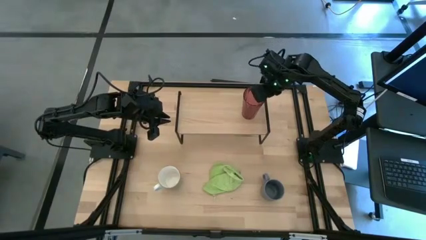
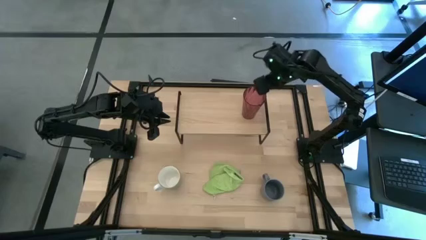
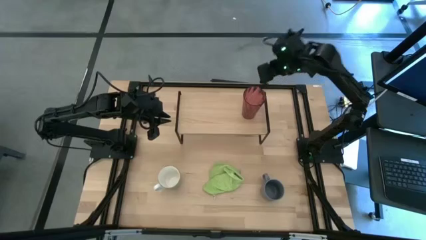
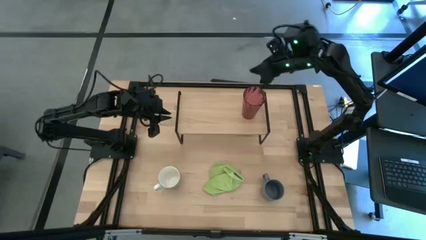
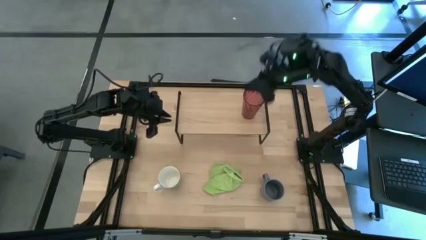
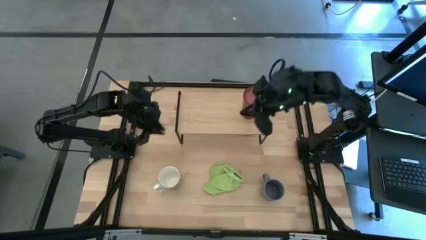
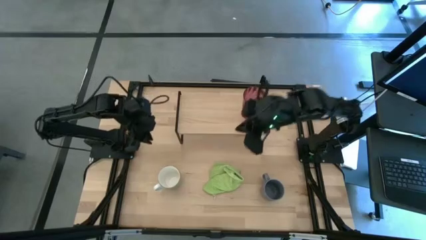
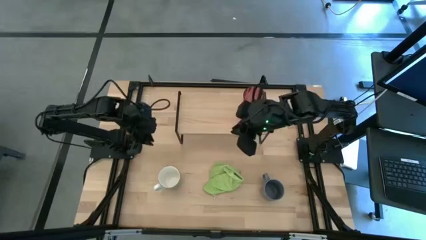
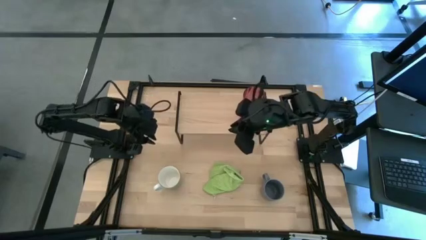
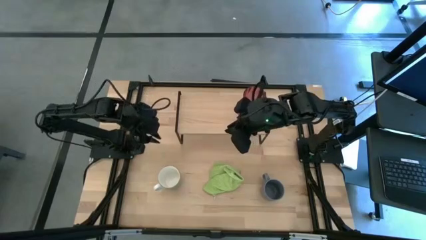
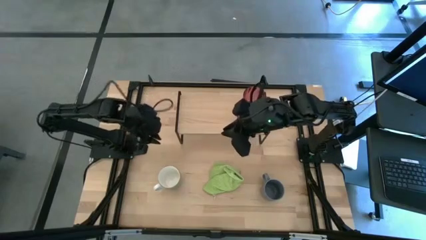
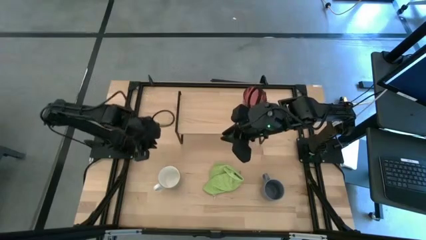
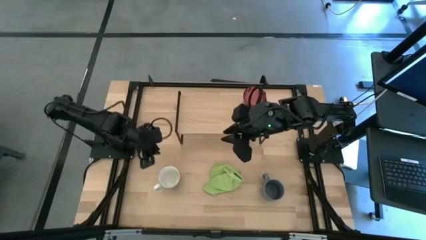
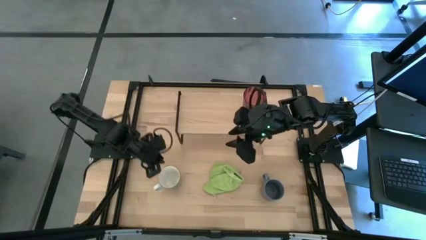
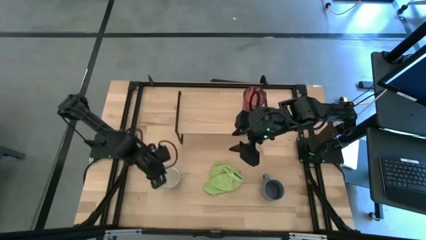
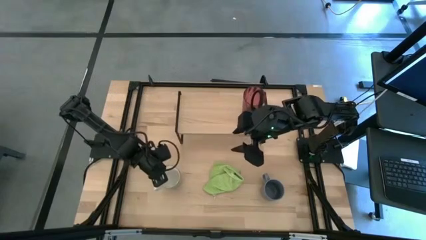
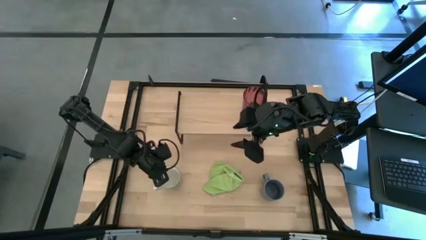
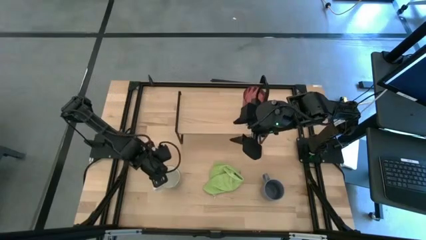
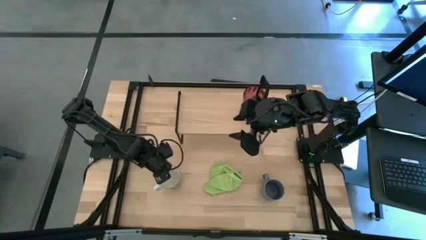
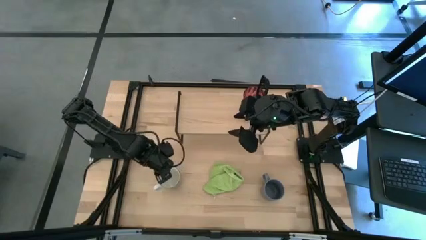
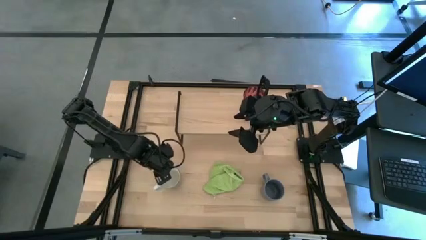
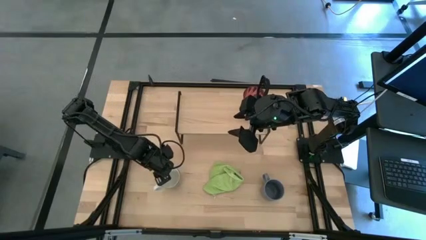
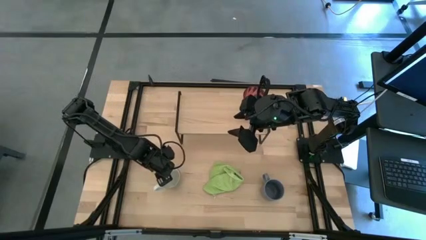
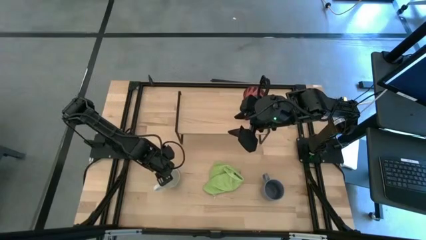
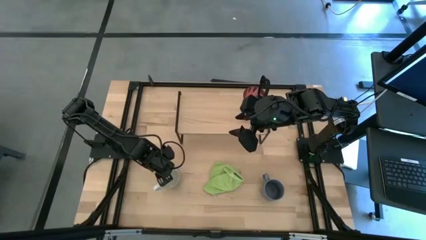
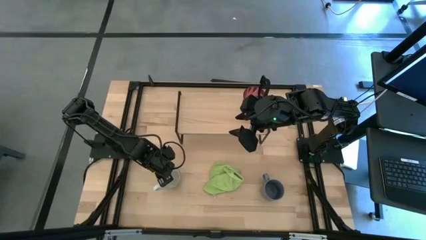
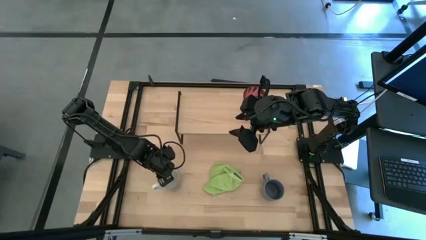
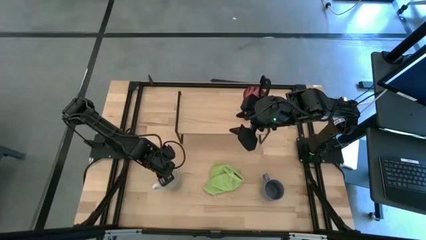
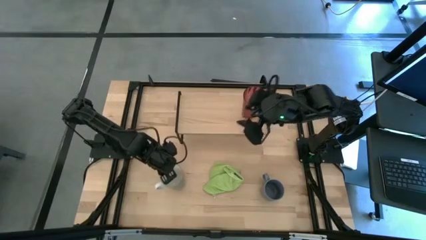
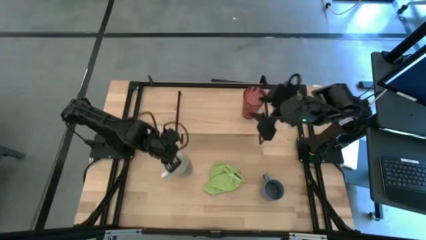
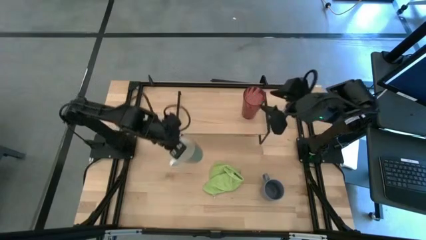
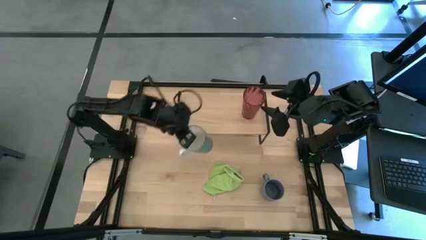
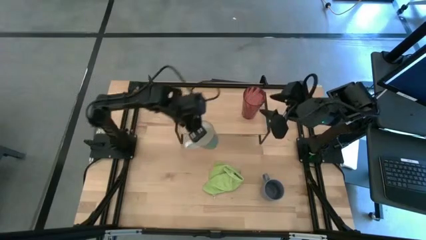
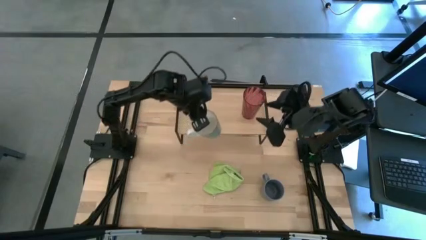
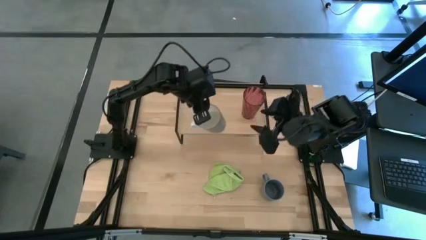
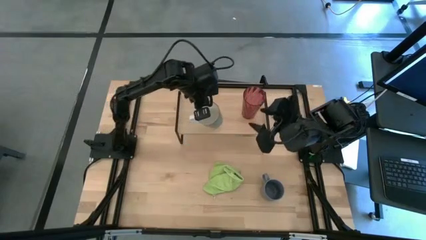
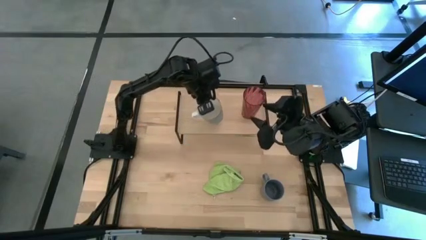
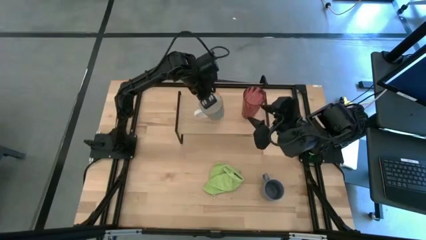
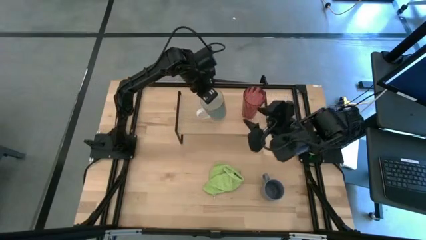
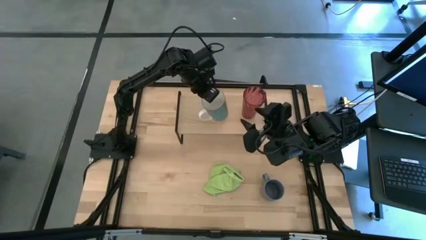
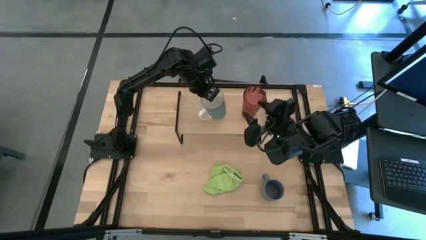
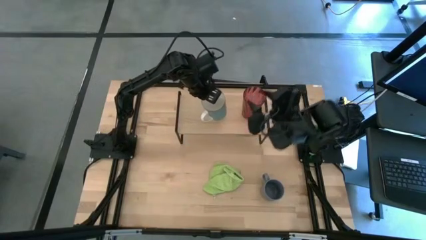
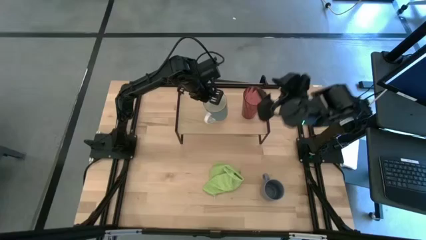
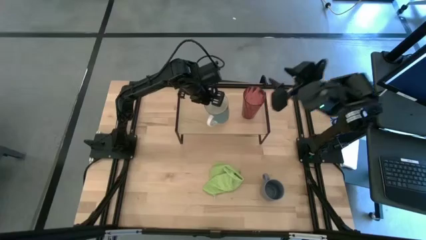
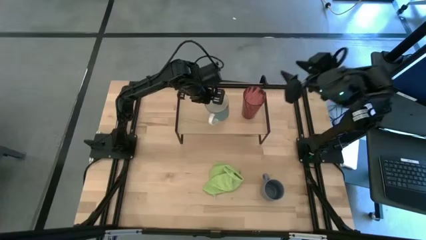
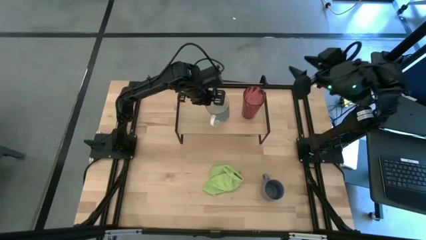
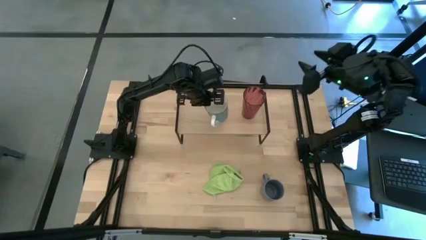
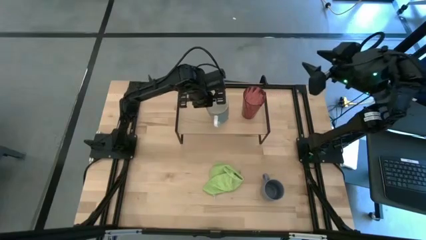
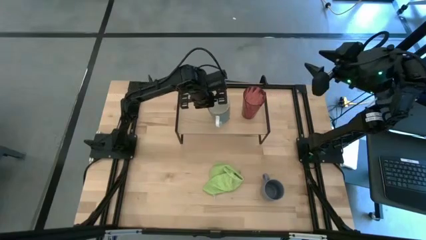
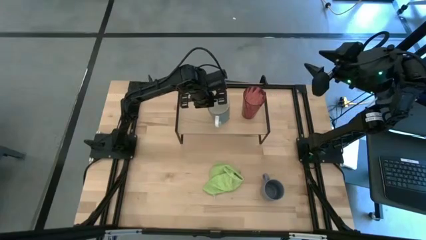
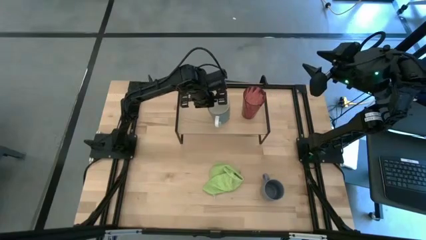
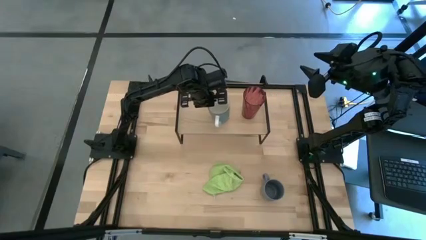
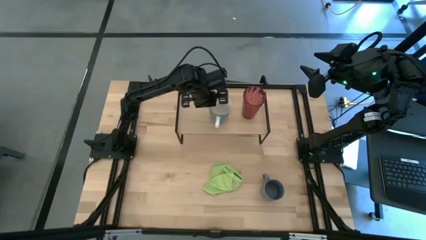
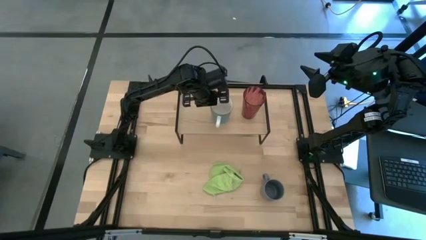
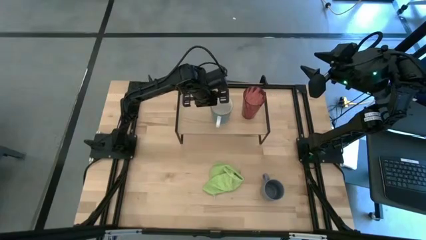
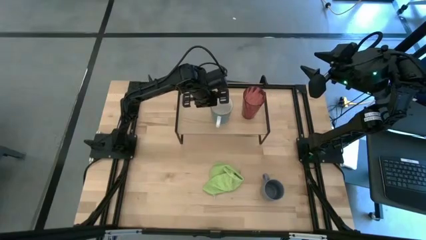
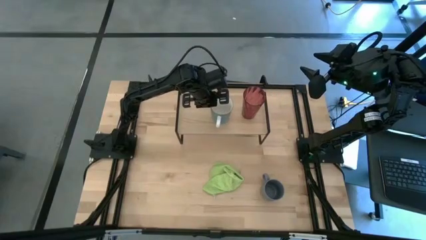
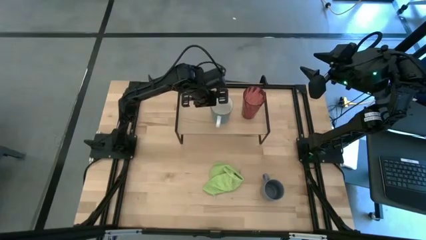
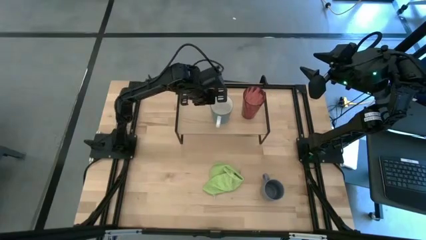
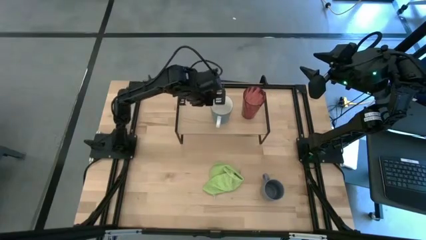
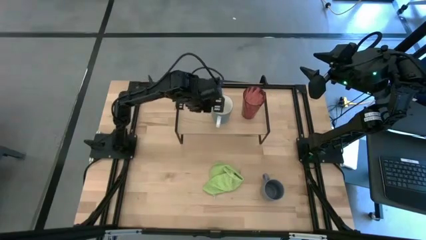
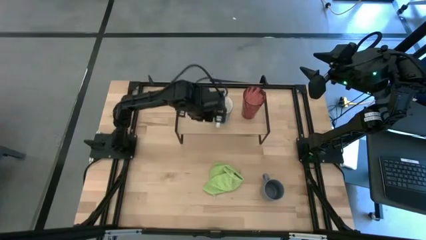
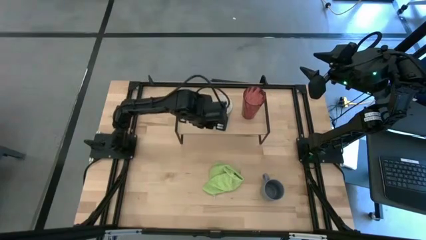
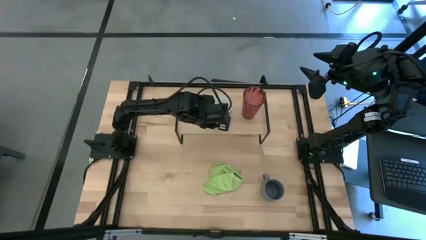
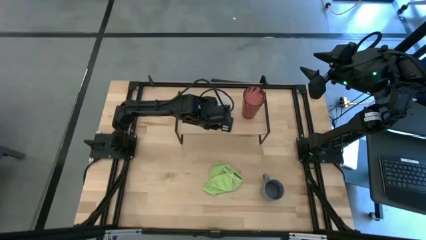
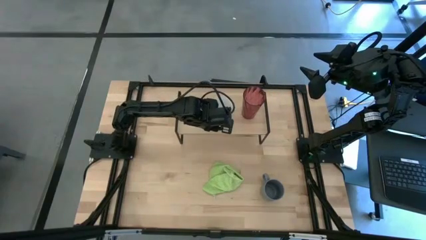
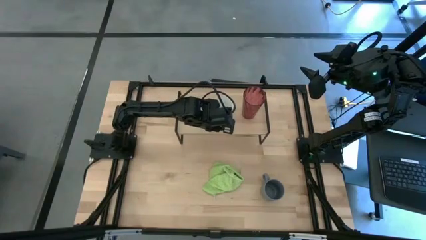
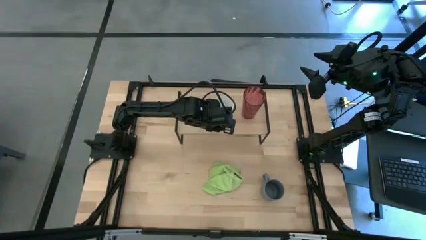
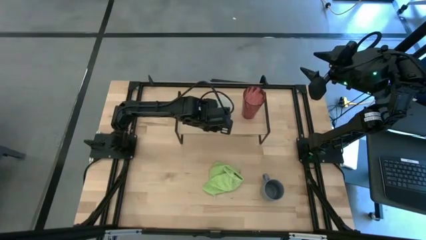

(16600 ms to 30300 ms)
Task: Stack small to large cups/mugs on shelf
Put the blue mug on the shelf
